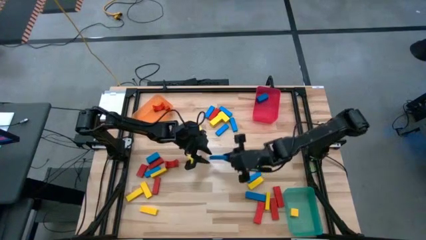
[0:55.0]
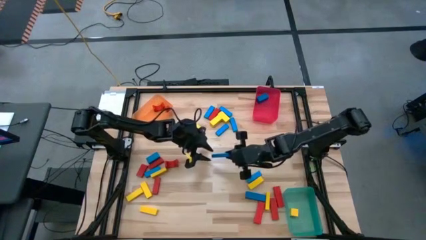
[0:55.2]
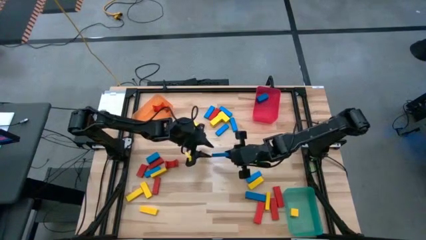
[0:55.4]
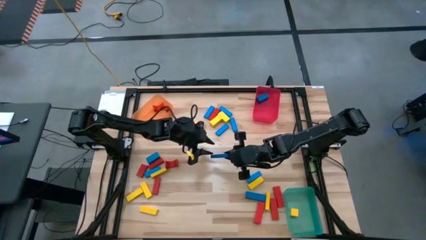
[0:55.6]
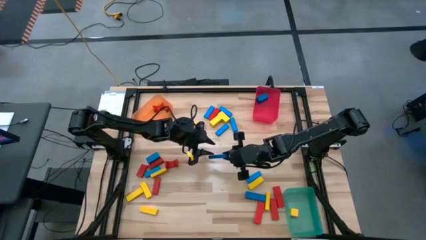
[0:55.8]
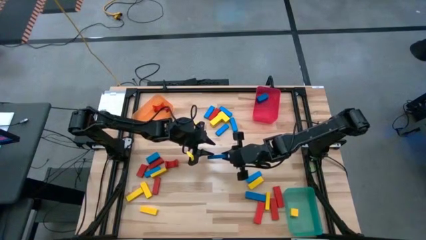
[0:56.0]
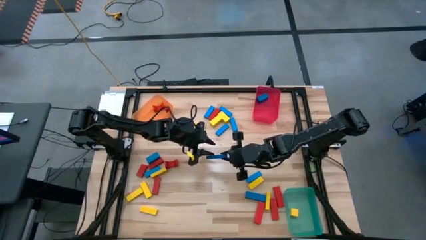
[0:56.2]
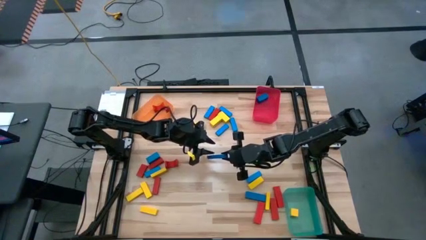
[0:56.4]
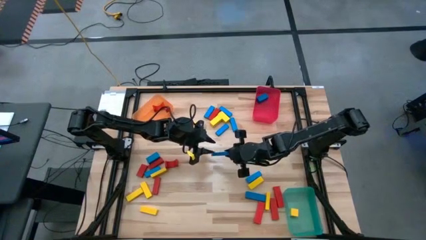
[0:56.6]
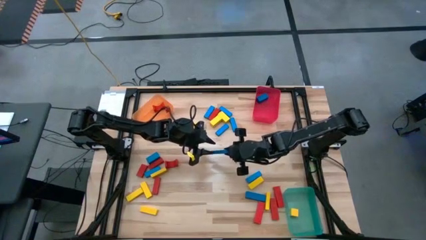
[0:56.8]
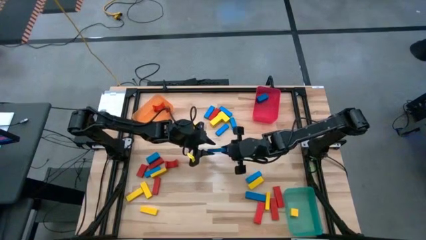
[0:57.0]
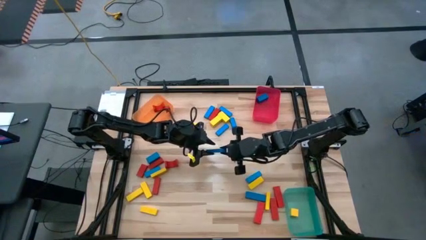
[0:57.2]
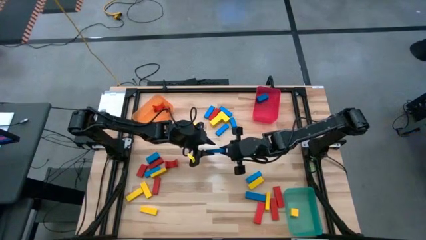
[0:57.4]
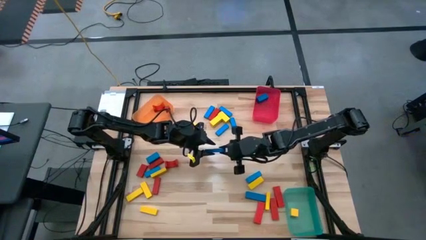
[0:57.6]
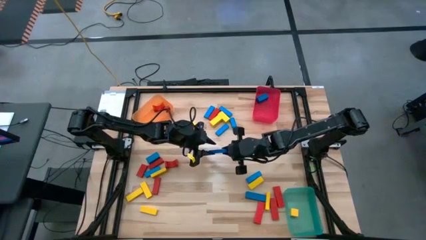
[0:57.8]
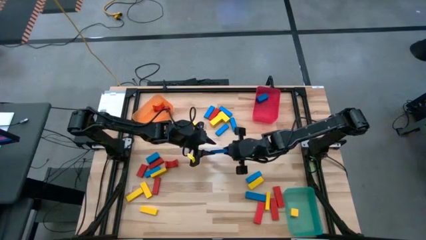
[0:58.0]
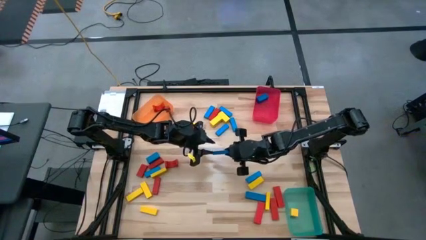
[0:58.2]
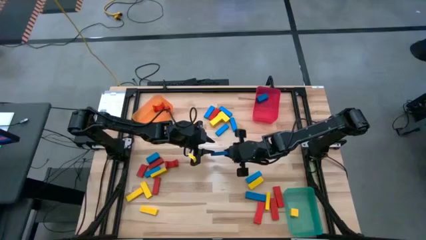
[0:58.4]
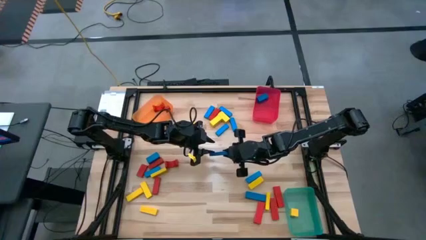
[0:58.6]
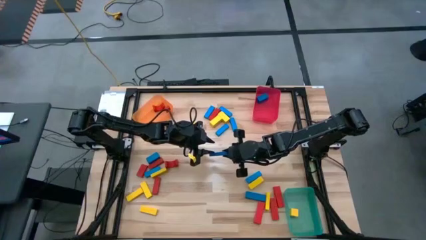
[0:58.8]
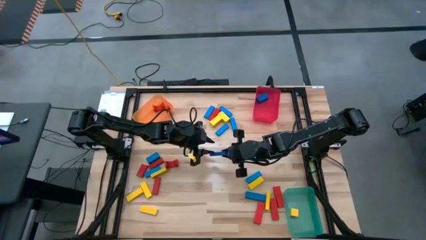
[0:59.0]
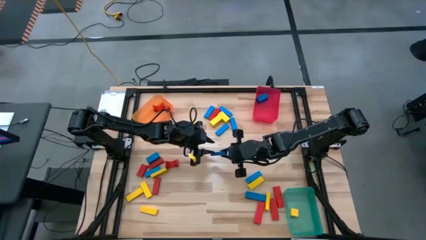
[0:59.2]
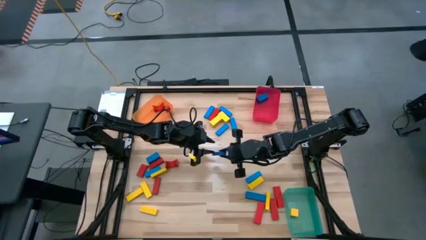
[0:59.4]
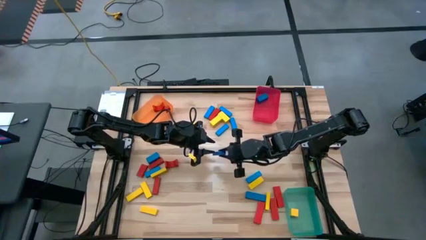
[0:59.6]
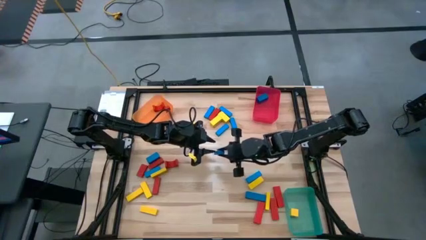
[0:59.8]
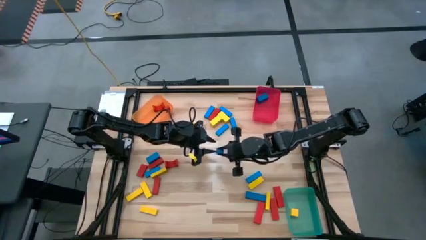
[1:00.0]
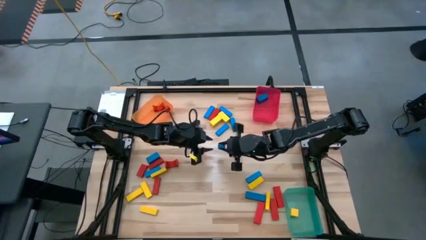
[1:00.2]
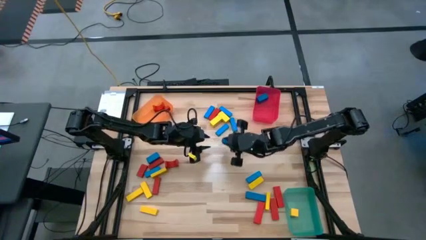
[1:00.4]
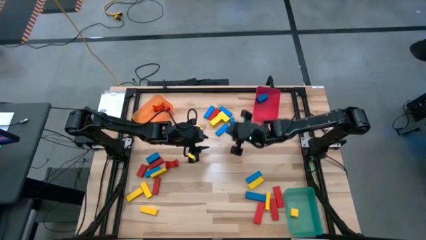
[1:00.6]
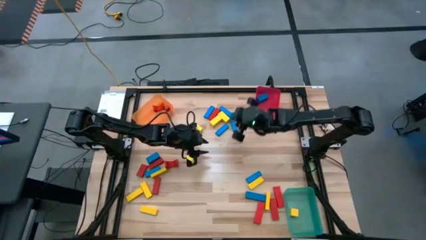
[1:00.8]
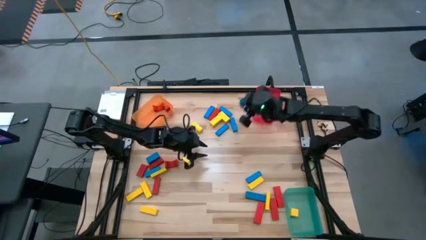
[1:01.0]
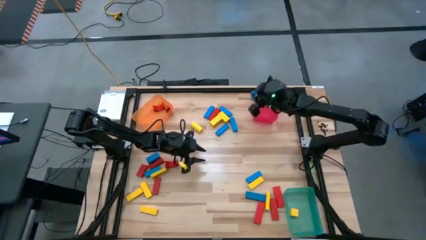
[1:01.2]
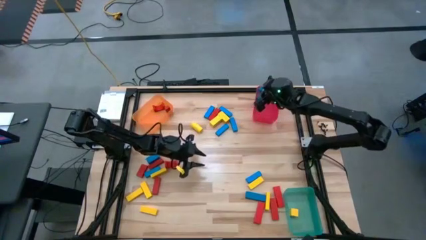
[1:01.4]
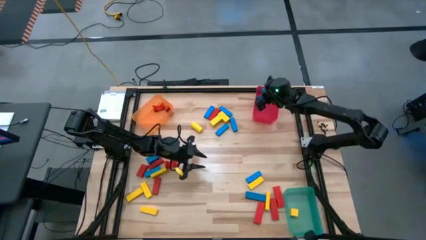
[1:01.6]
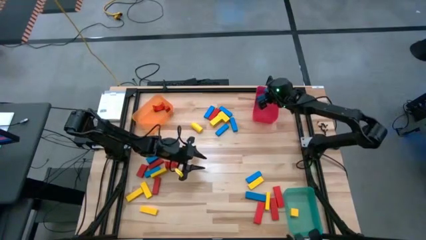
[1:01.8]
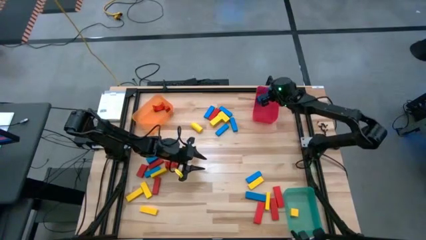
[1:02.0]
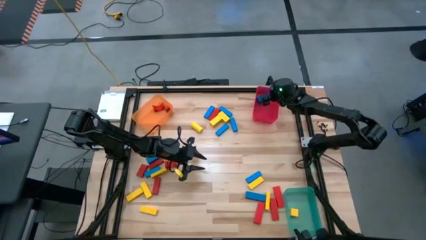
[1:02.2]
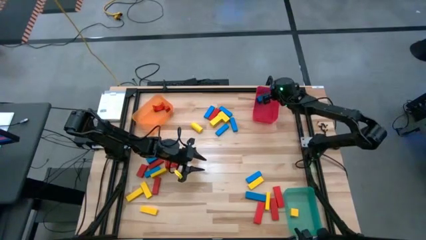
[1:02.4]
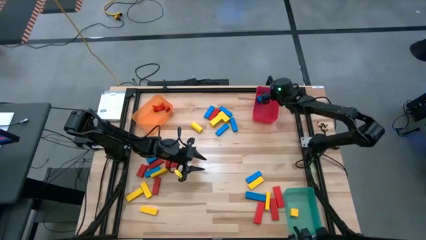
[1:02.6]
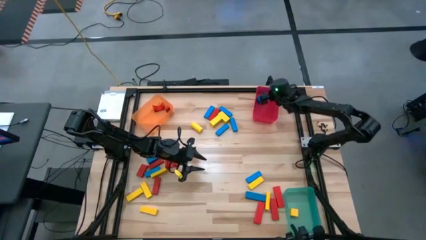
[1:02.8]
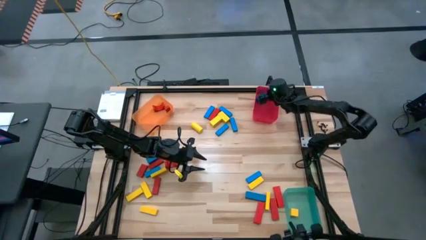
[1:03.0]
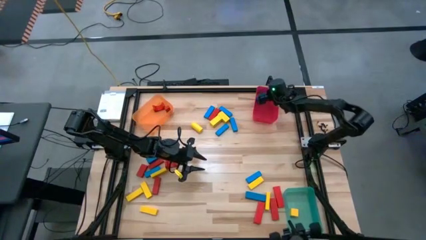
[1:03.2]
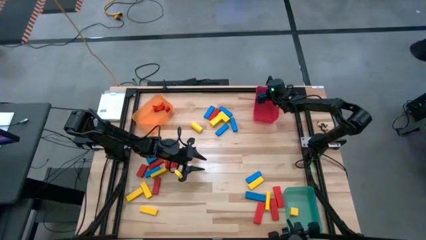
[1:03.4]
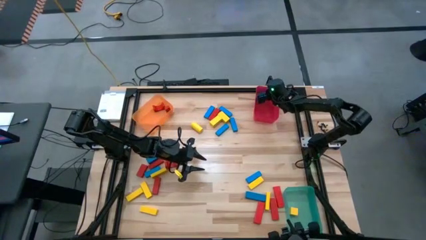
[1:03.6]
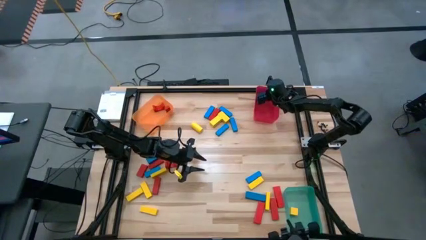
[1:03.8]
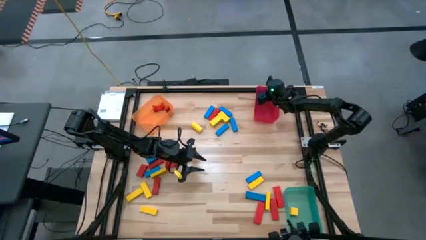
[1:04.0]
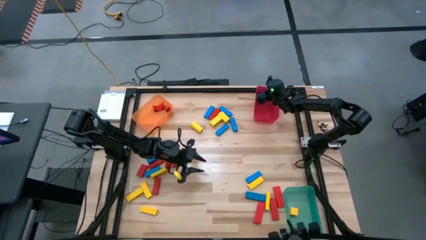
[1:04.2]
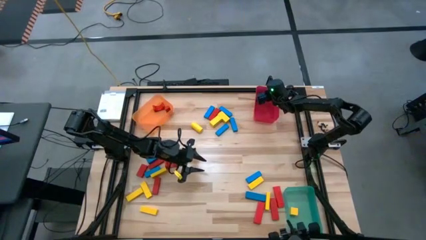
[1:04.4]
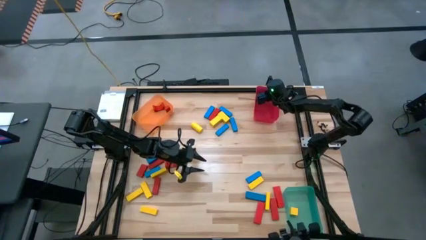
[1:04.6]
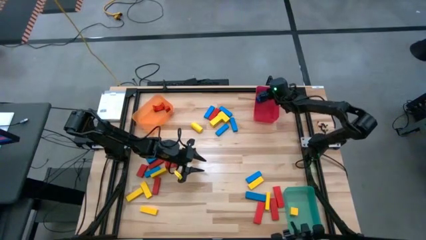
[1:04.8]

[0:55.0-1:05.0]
Task: Sort blocks
Put the blue block into the red bin

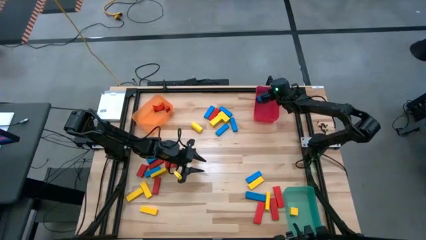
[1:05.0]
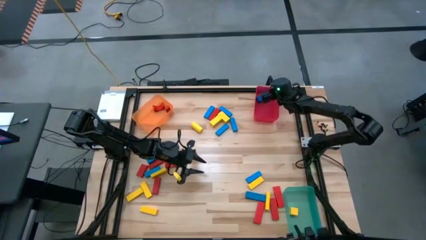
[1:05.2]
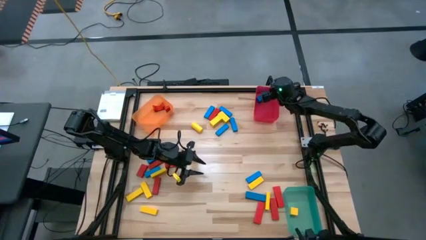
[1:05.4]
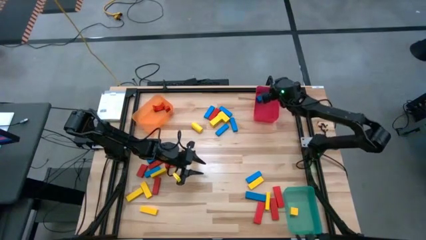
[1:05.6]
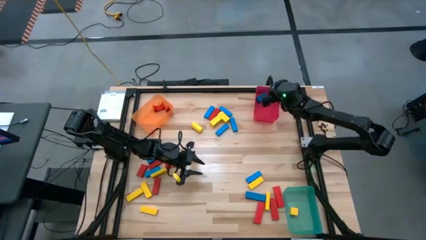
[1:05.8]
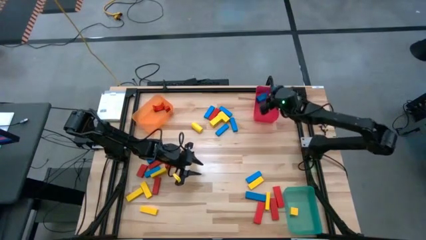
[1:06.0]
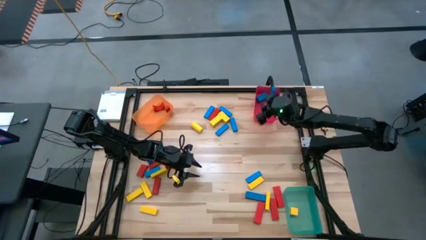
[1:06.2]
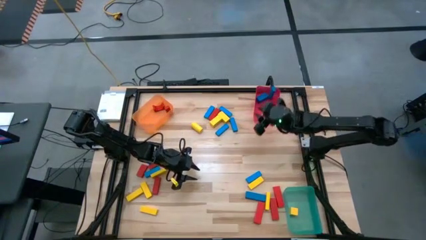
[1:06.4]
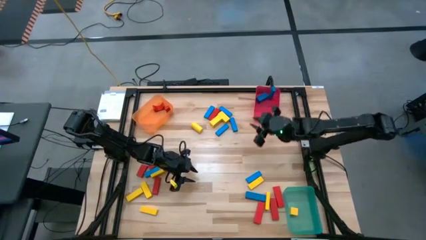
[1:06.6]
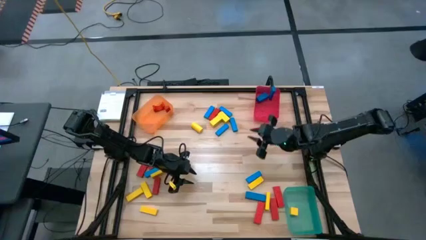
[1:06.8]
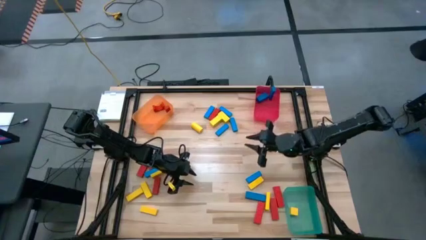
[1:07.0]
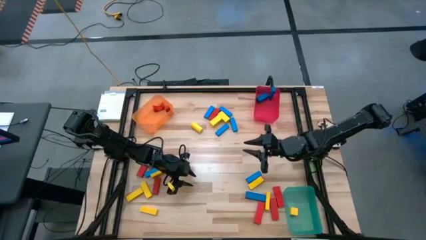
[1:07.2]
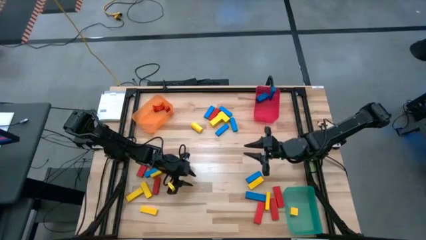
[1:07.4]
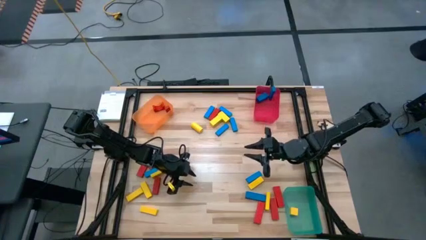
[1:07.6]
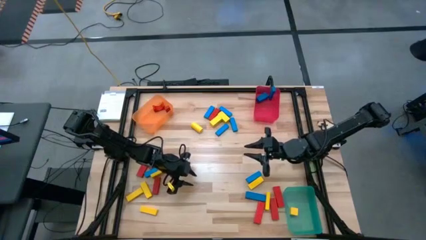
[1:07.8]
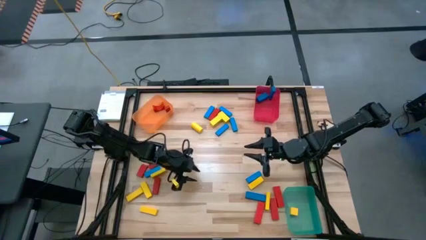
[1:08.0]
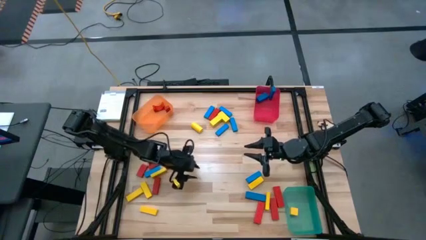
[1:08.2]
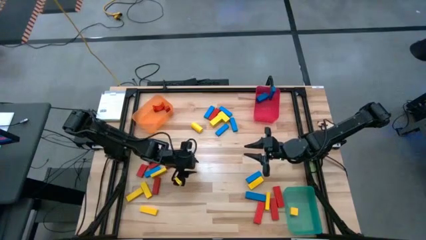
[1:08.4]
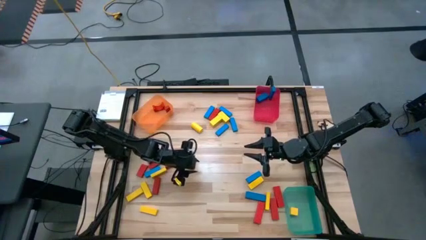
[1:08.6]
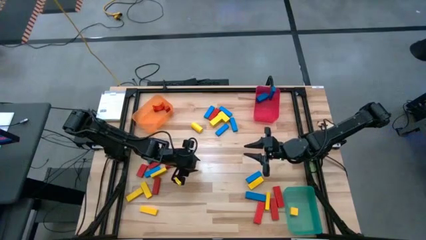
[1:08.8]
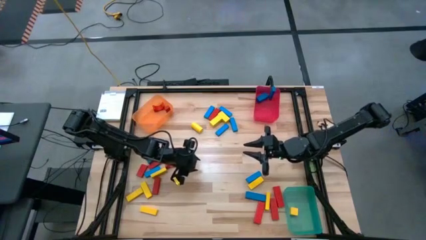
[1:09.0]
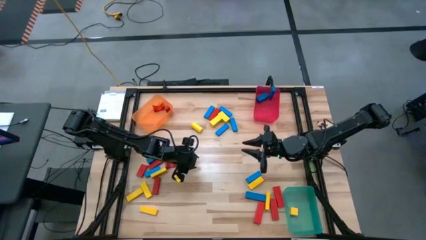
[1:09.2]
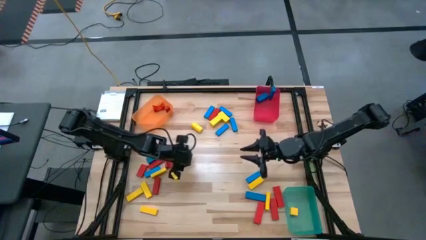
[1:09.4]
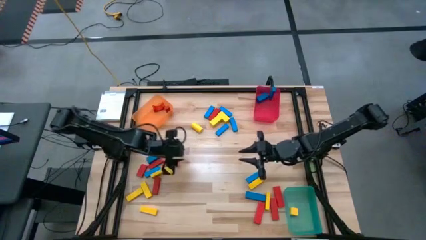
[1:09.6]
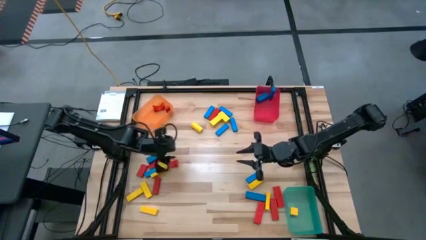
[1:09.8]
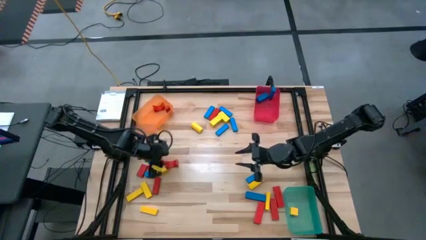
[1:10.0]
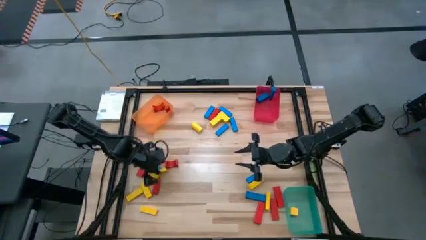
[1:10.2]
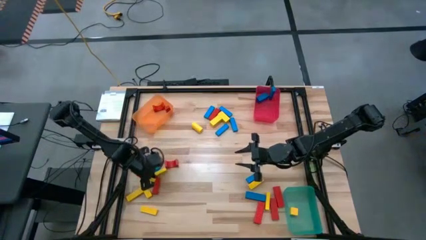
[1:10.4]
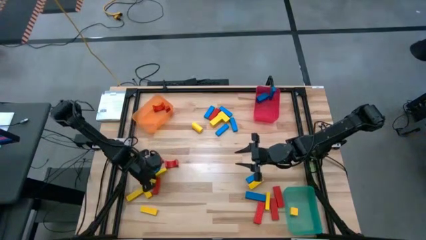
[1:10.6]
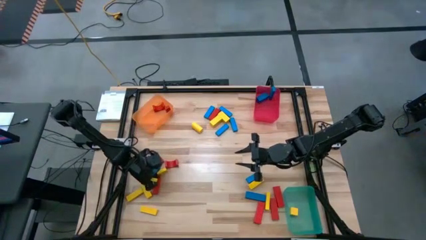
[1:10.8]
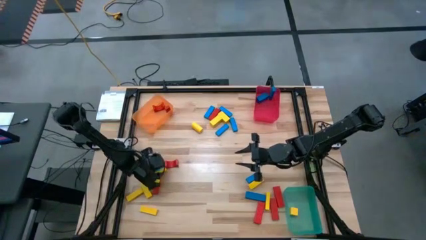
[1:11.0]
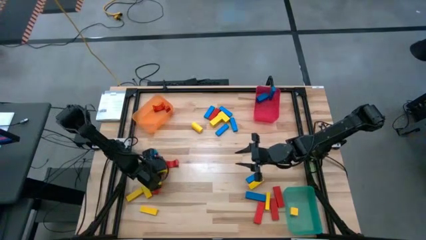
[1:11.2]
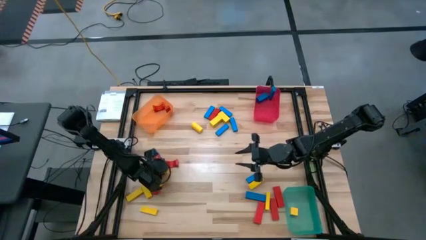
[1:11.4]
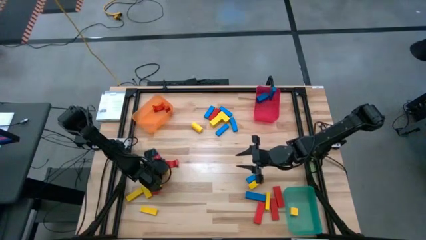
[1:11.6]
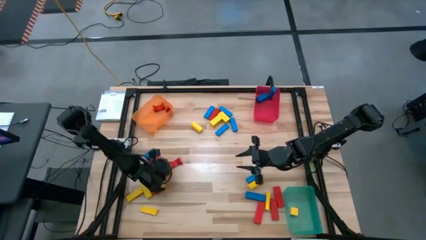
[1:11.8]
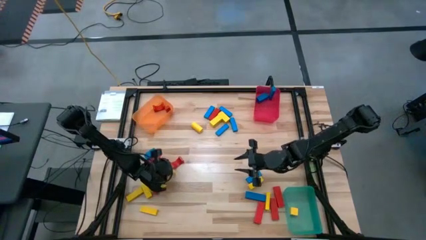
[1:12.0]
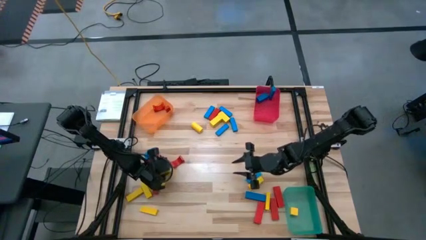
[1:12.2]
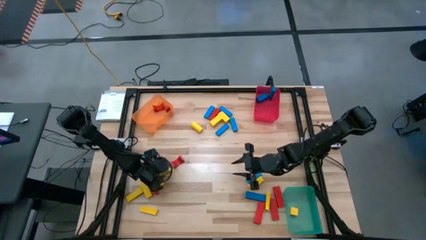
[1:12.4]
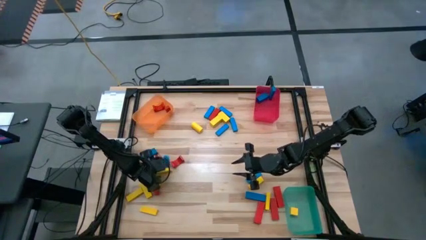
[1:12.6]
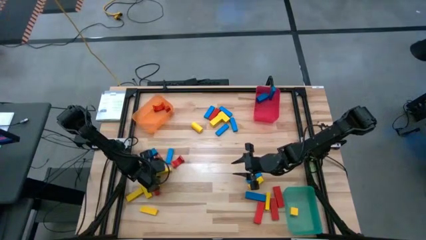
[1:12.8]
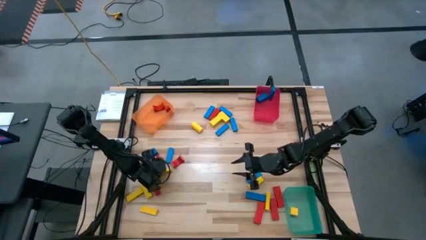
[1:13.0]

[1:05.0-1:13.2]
Put the blue block into the red bin
